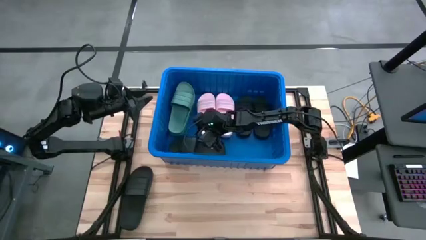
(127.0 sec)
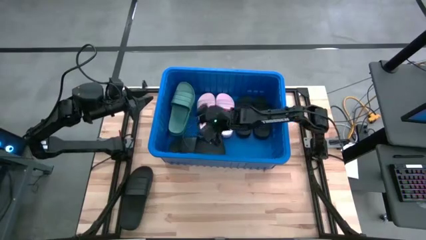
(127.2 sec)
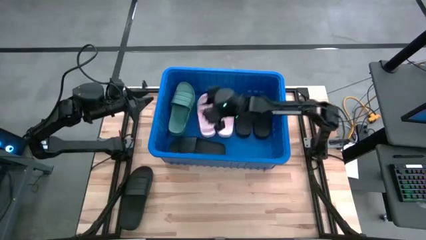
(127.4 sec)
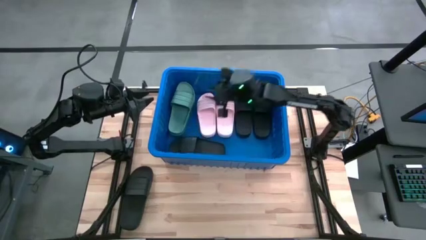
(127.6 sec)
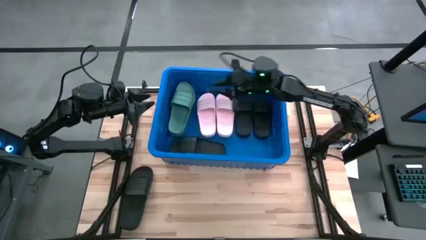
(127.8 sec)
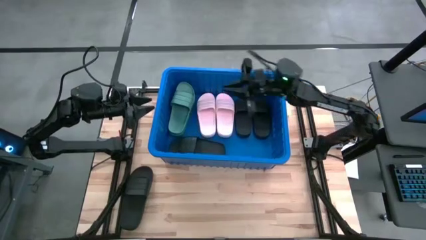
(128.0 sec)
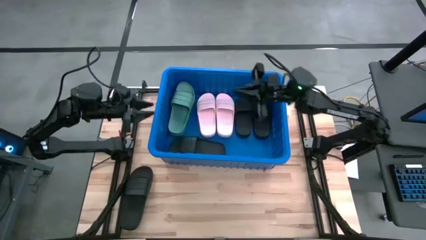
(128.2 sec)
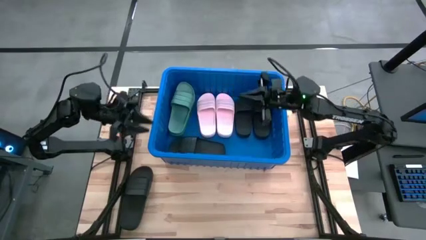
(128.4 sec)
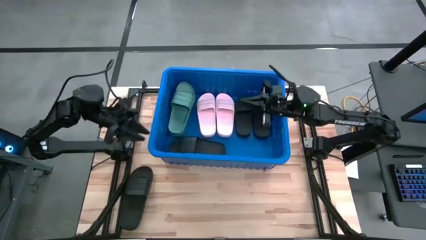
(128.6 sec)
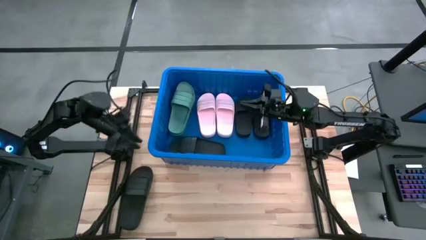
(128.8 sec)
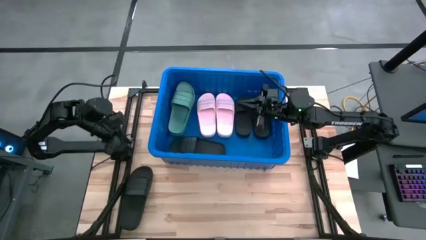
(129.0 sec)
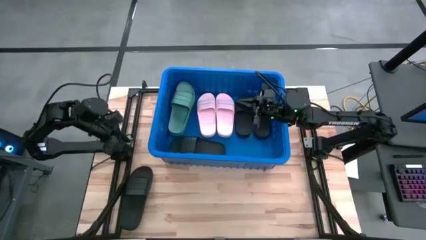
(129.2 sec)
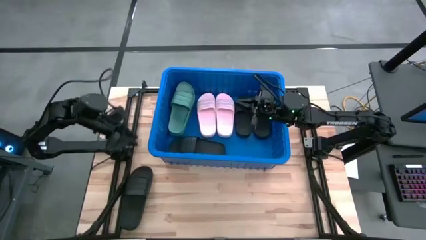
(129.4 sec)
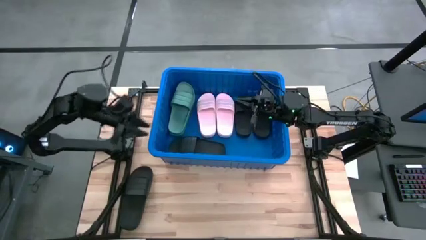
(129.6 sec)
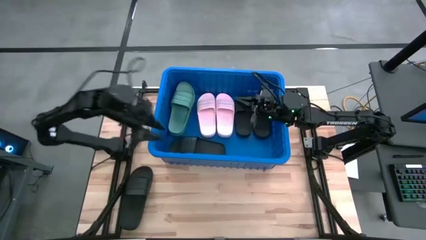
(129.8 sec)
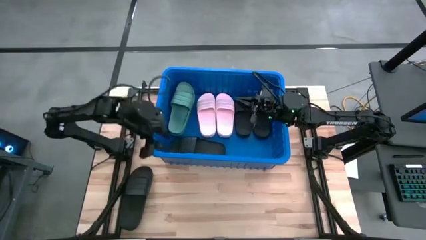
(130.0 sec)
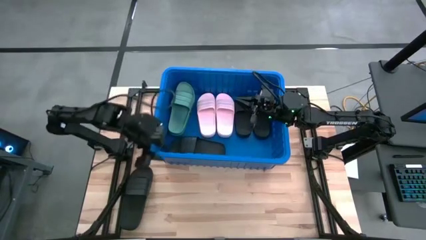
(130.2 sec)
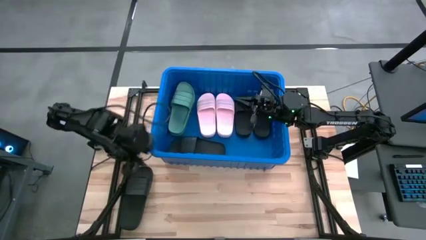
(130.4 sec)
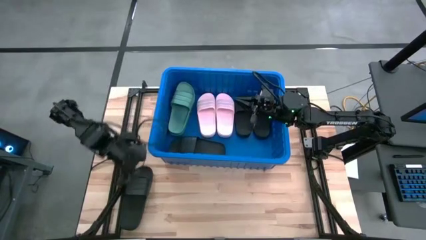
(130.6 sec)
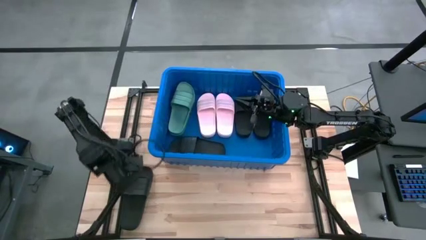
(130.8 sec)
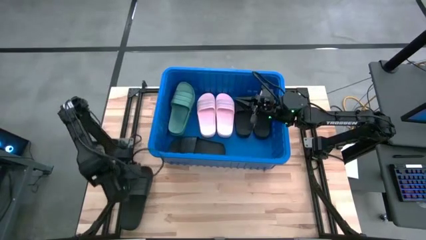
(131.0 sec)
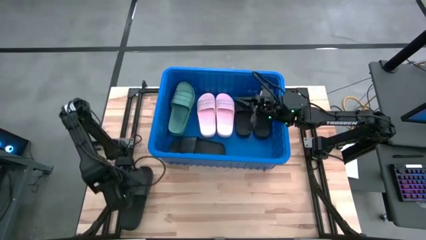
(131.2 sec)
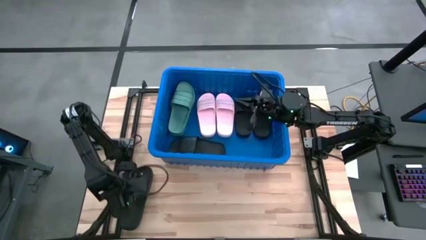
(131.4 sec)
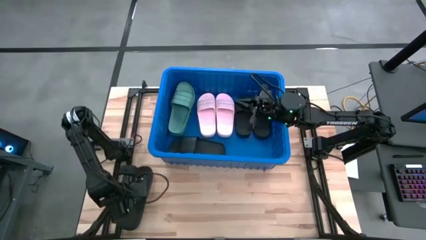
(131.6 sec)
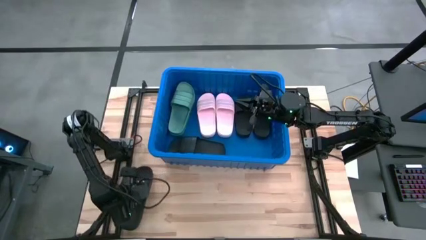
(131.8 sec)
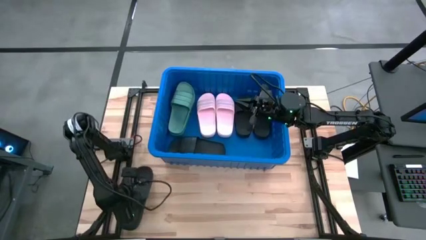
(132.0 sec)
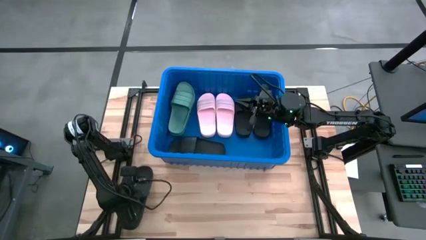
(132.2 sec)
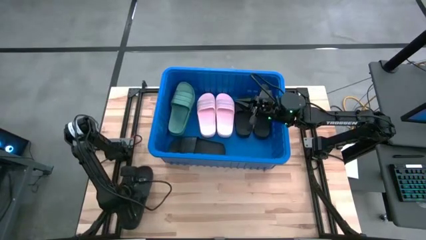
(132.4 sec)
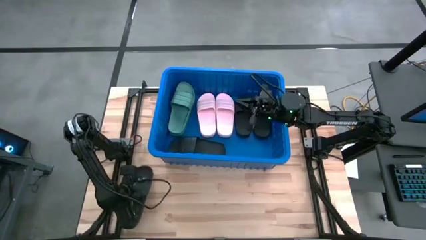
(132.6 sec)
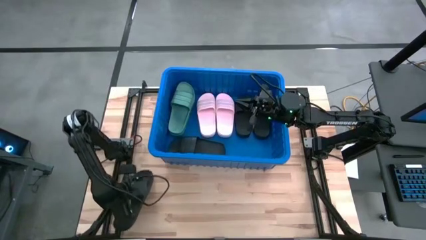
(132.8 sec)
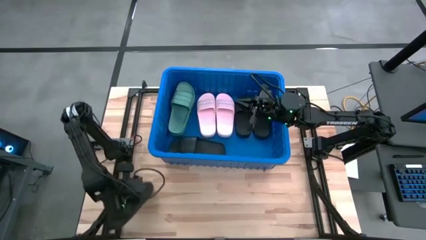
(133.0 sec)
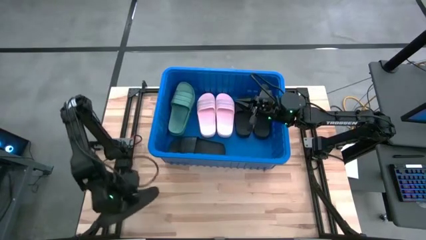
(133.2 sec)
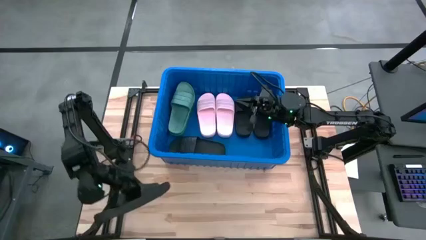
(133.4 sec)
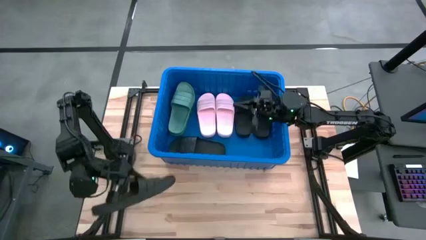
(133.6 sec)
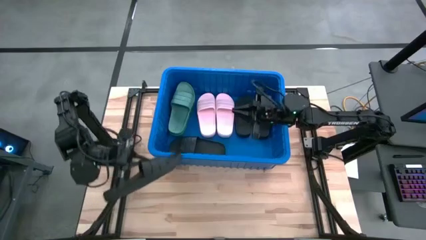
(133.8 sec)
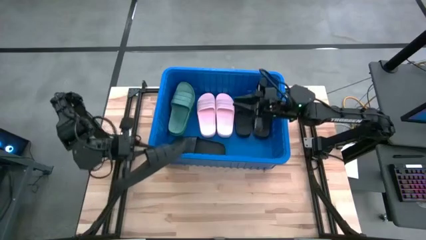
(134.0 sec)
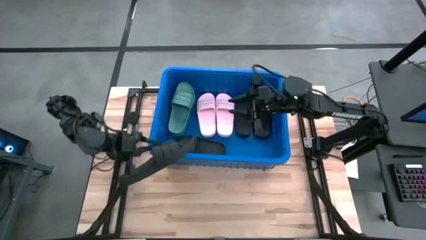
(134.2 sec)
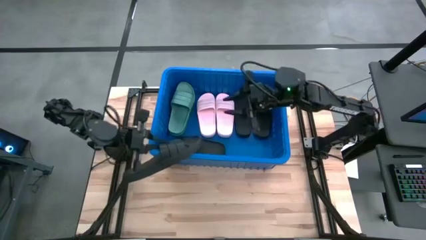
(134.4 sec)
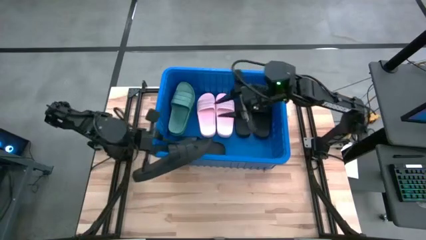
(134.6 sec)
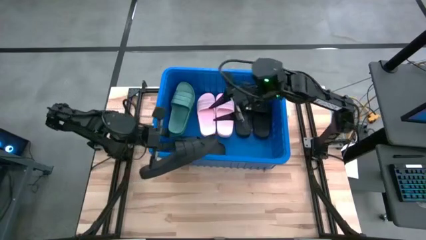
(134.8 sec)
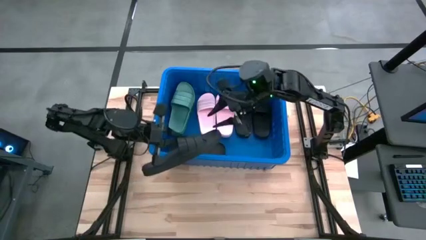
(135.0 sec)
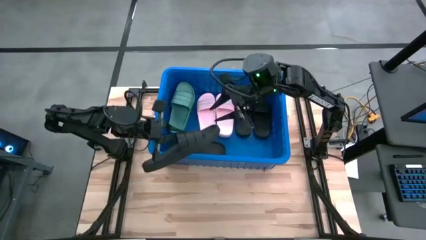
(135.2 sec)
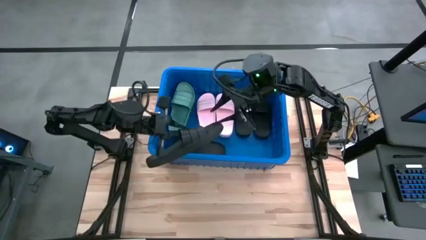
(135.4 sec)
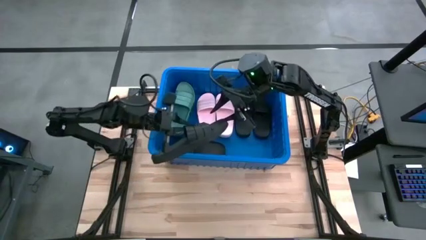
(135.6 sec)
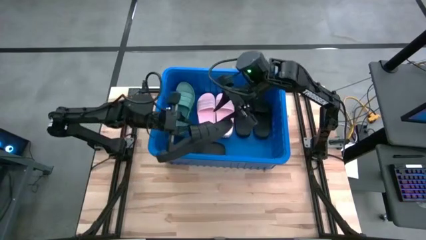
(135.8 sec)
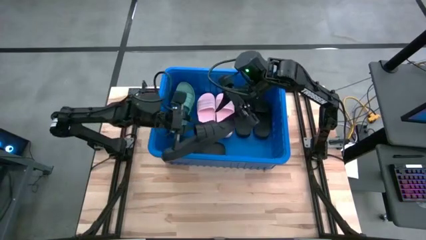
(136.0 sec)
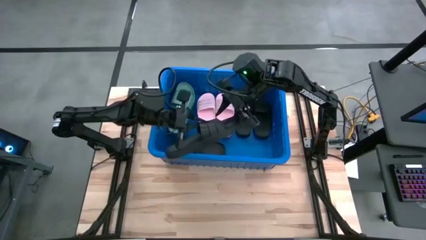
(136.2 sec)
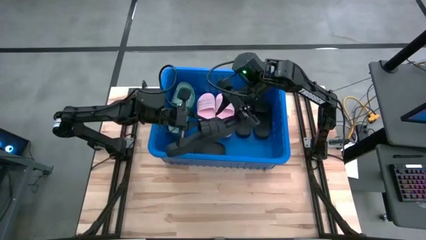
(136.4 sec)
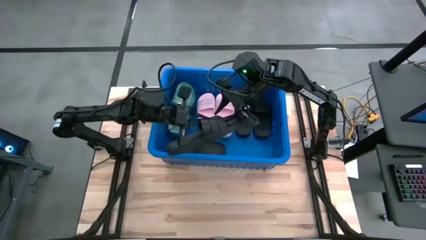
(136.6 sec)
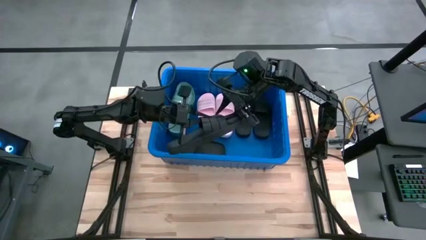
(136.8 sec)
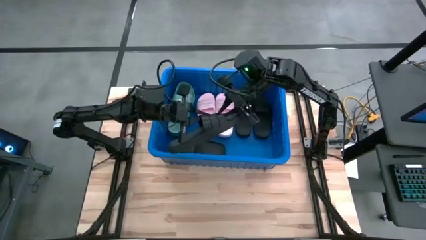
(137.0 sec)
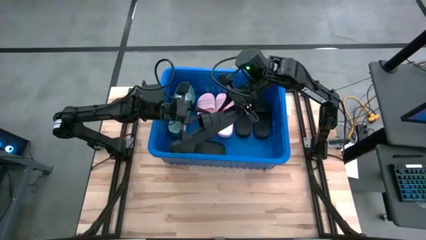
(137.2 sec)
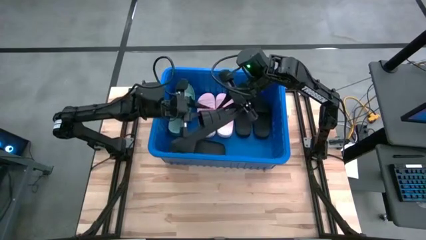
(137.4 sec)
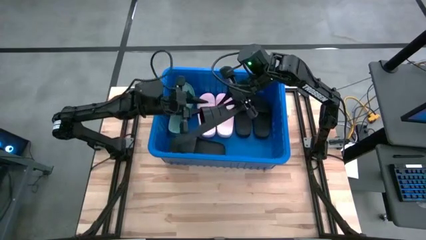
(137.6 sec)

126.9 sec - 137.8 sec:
Task: Pick and place slides into bin
Put the black slide into the blue bin
